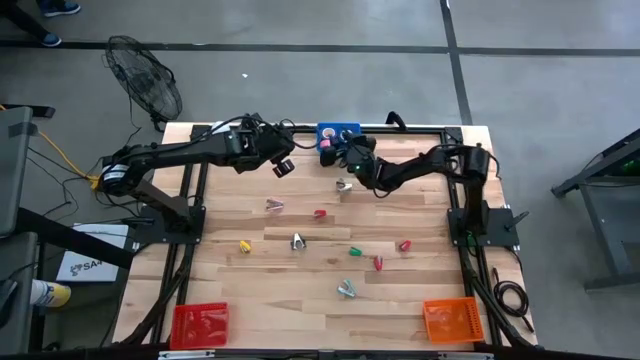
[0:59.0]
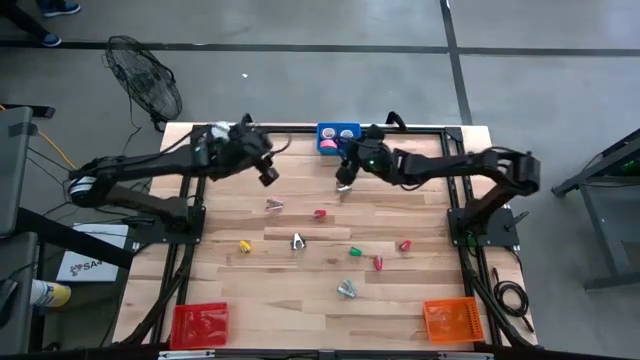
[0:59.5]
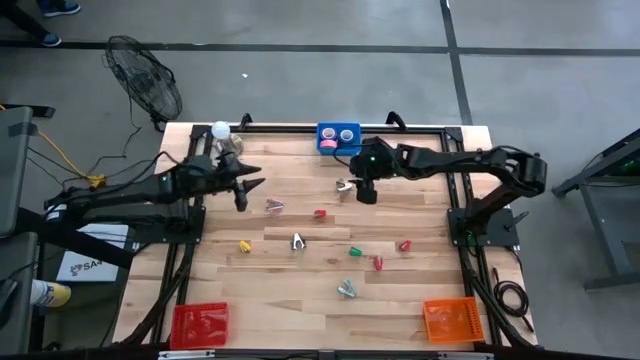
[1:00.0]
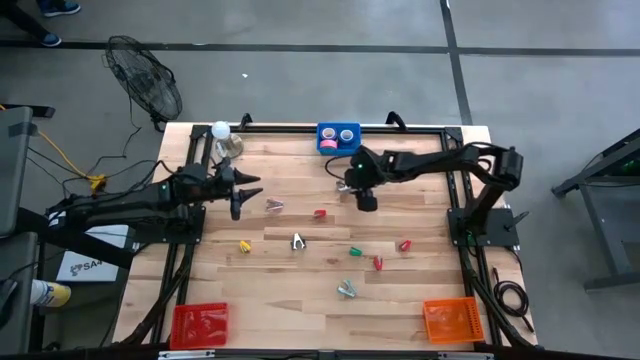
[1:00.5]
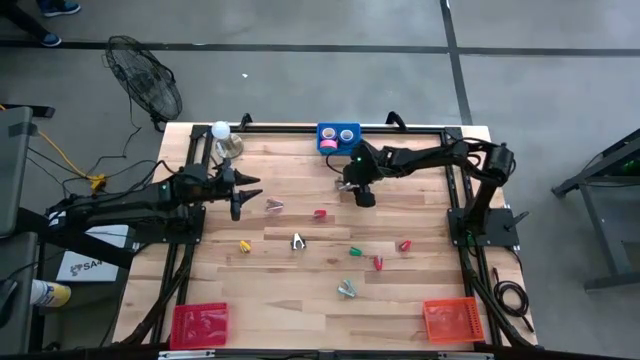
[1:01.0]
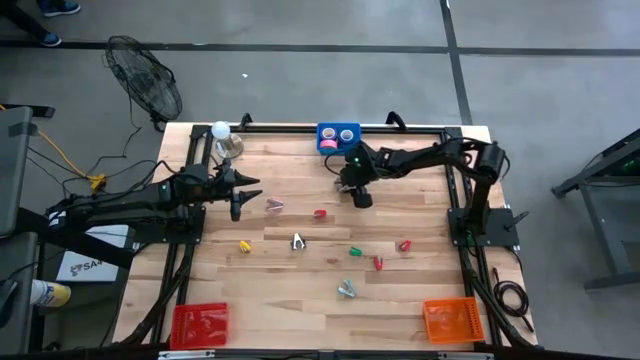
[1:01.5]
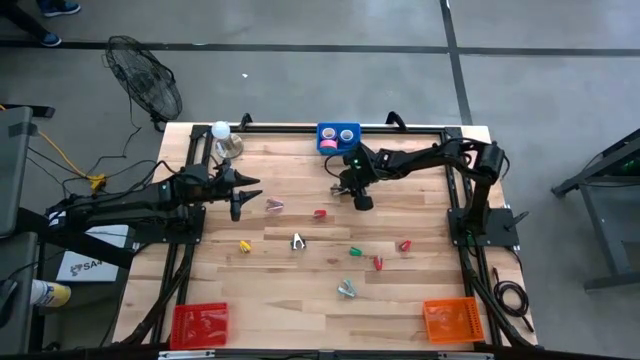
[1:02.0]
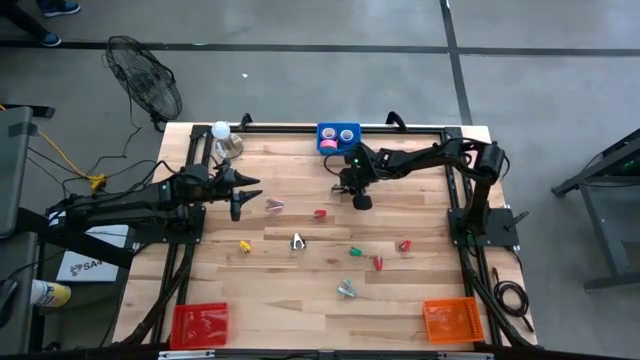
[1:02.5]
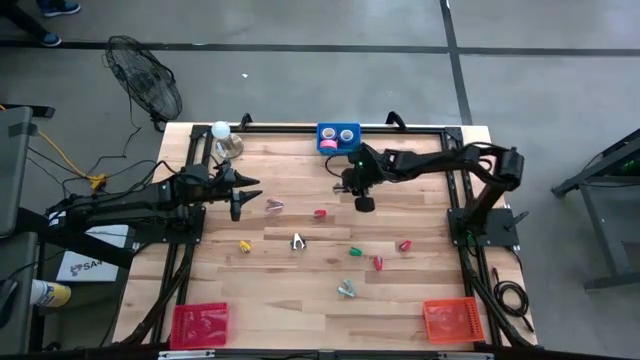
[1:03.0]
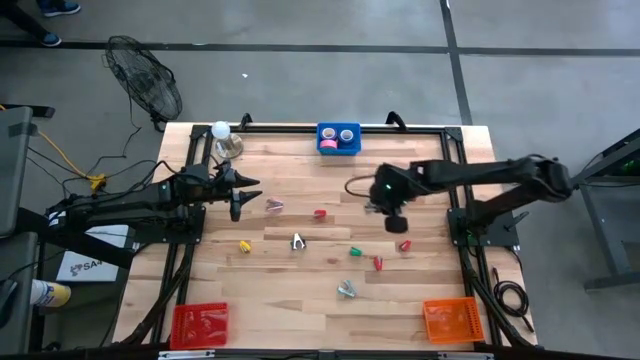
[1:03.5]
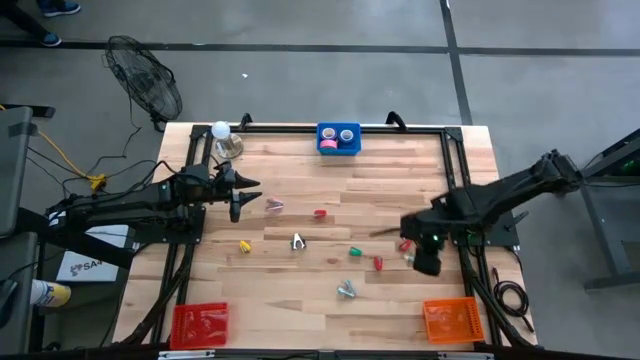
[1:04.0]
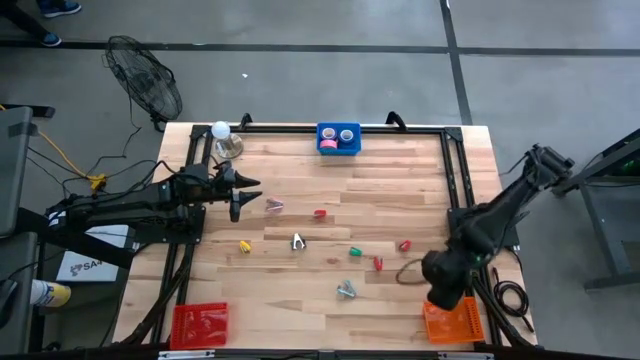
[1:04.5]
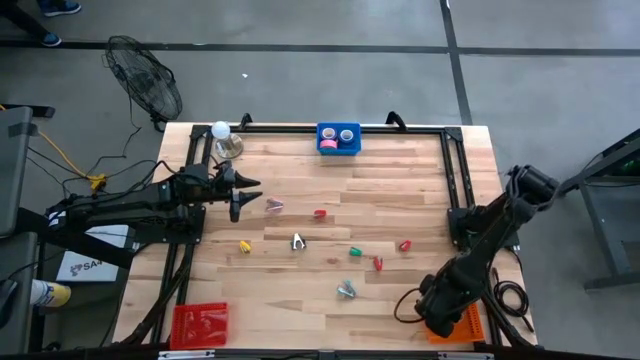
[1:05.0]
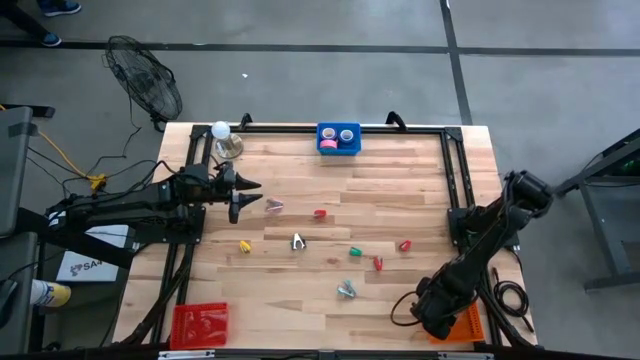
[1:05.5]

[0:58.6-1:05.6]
Task: Pick and place Stapler, Stapler remover, tape
Put the gray staple remover into the orange bin

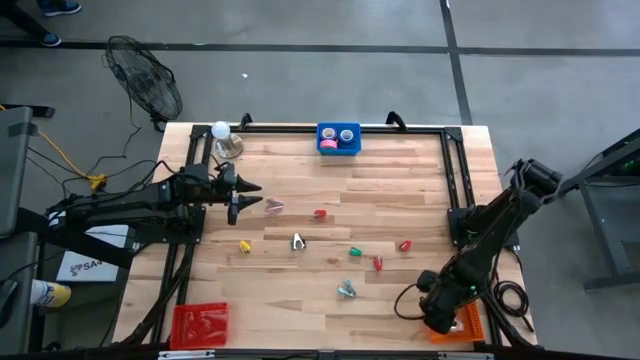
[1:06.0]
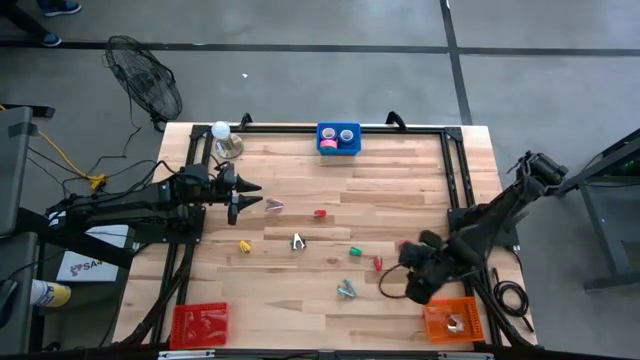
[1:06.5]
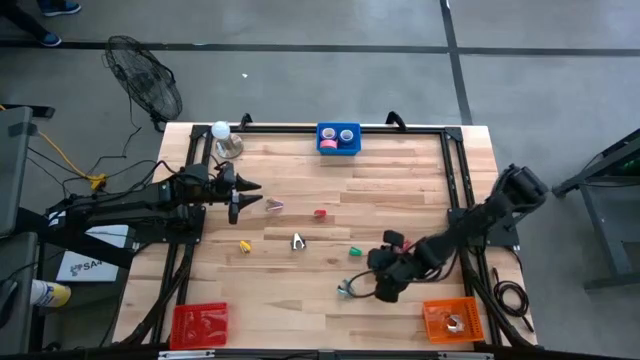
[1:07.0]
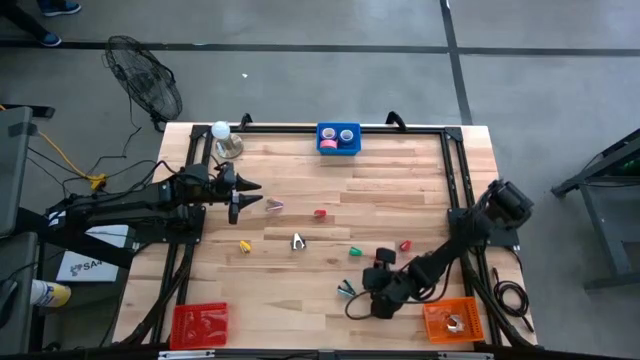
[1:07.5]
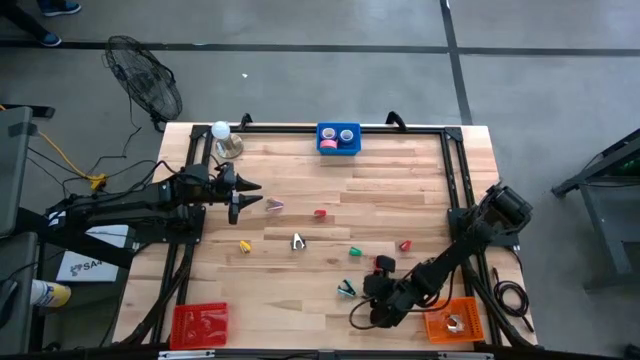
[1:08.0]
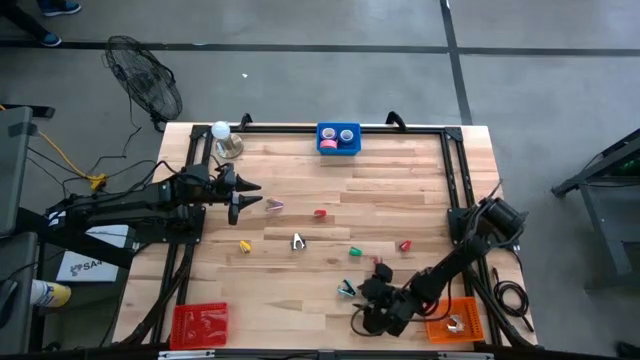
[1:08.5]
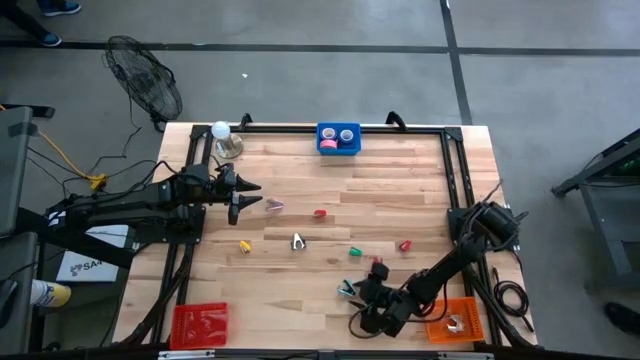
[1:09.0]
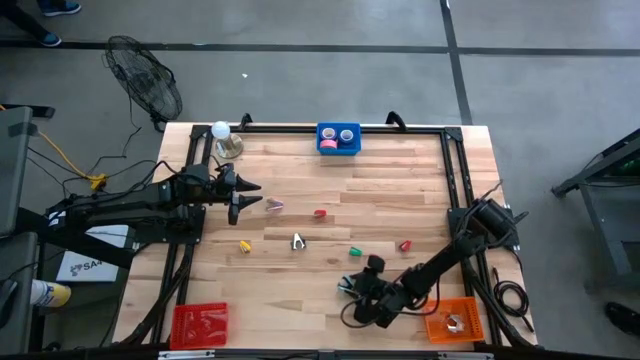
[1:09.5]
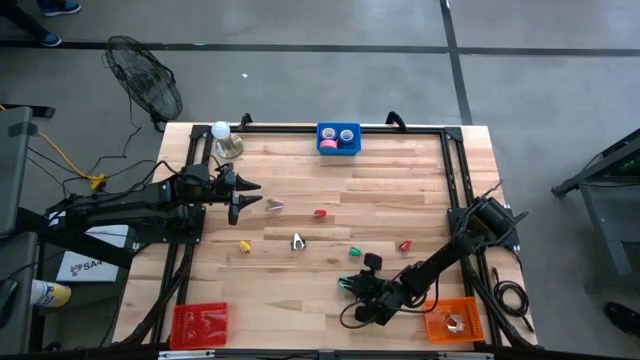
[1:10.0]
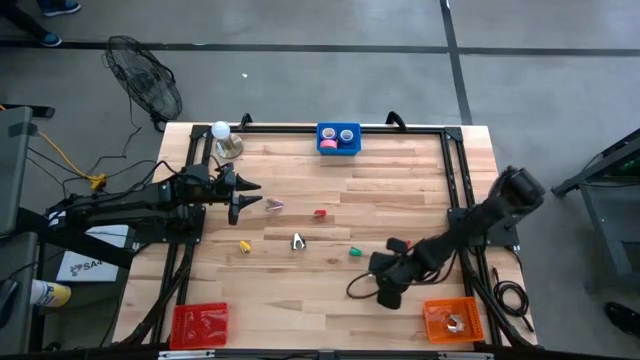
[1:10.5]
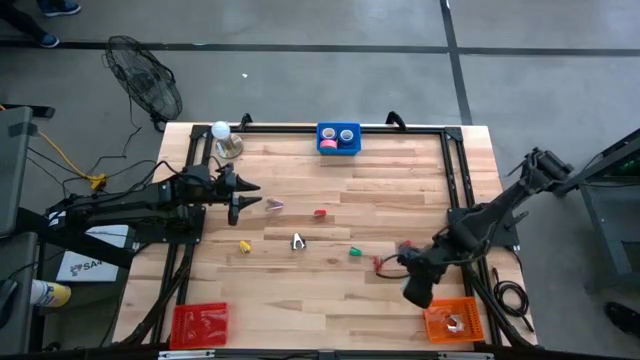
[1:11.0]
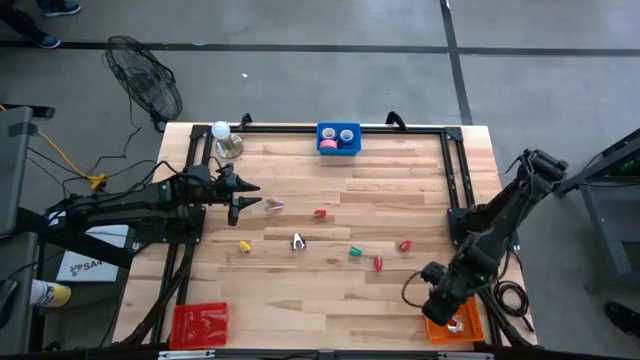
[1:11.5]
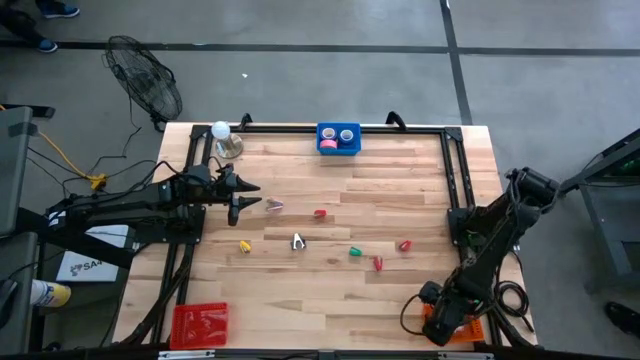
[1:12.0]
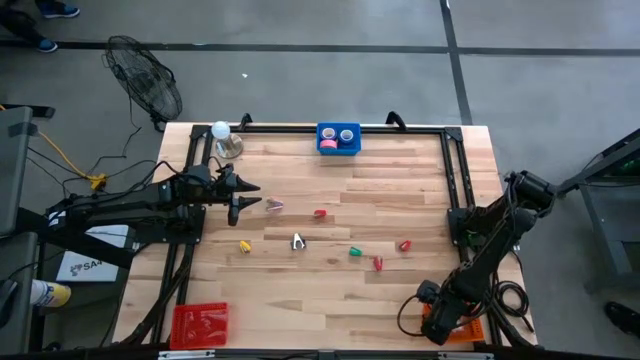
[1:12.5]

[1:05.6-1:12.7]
Put the light blue staple remover into the orange bin

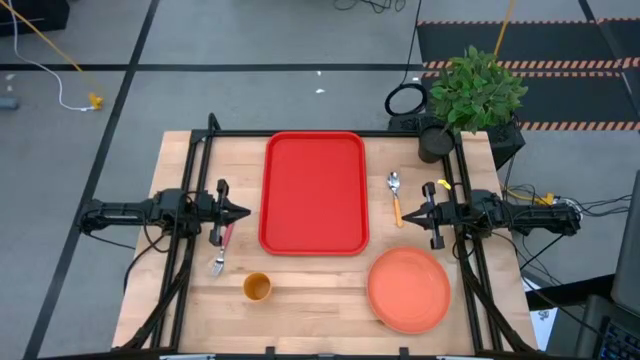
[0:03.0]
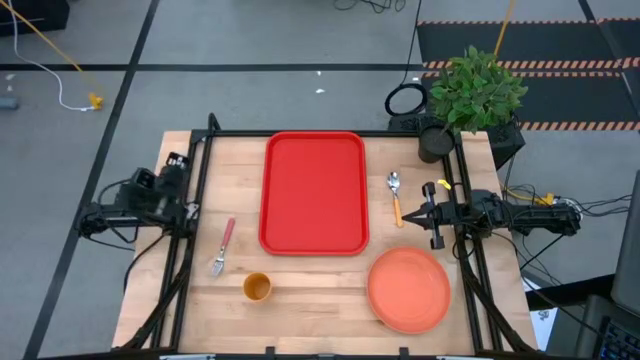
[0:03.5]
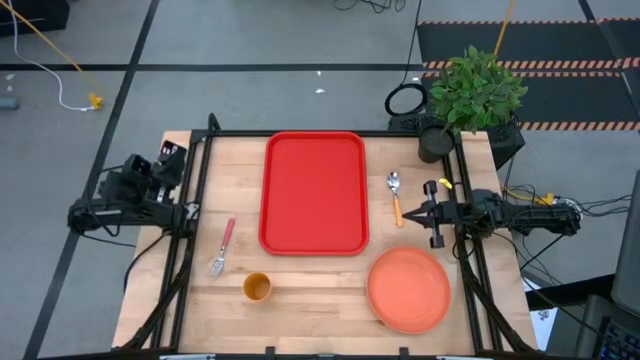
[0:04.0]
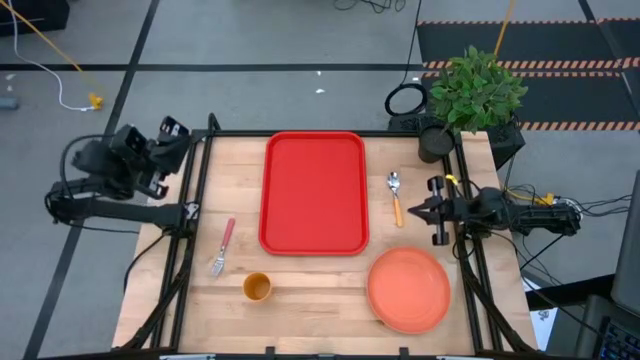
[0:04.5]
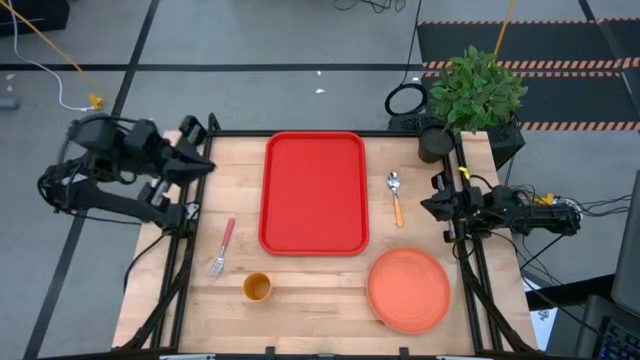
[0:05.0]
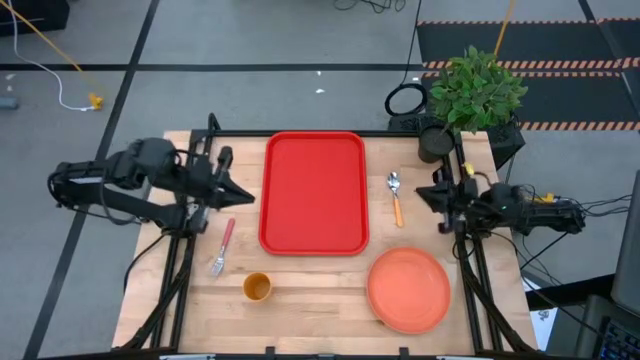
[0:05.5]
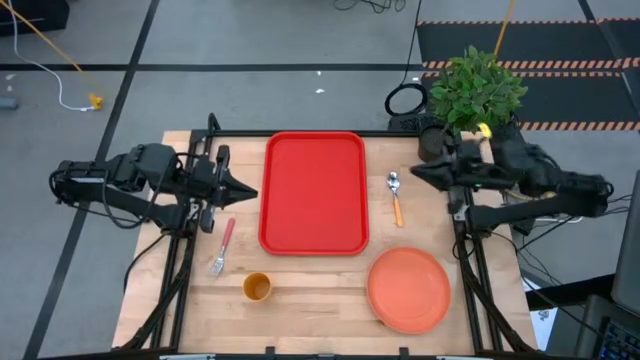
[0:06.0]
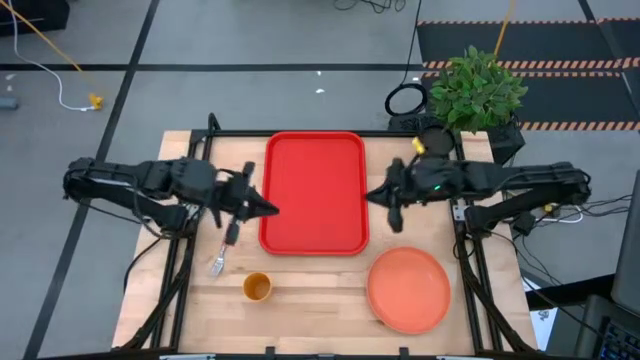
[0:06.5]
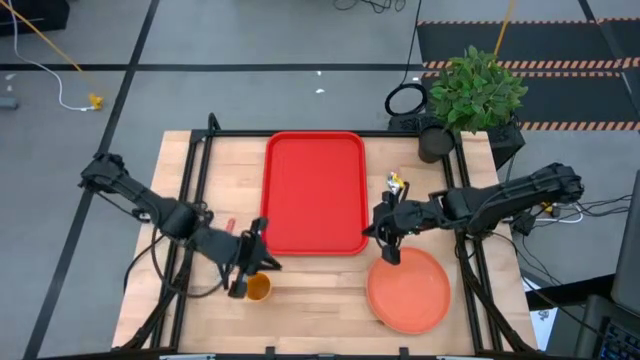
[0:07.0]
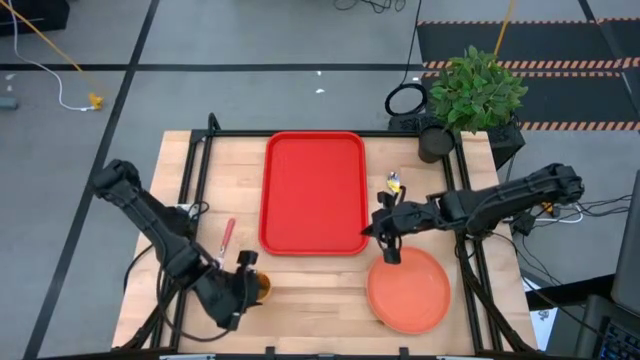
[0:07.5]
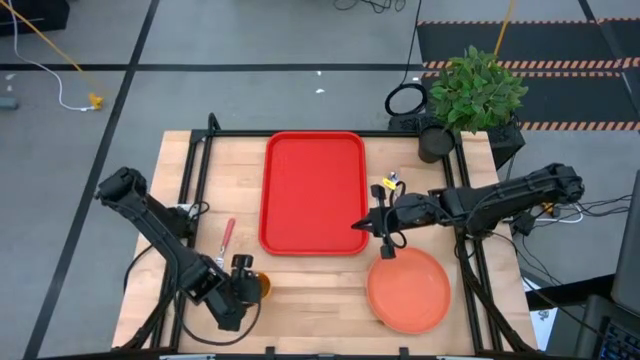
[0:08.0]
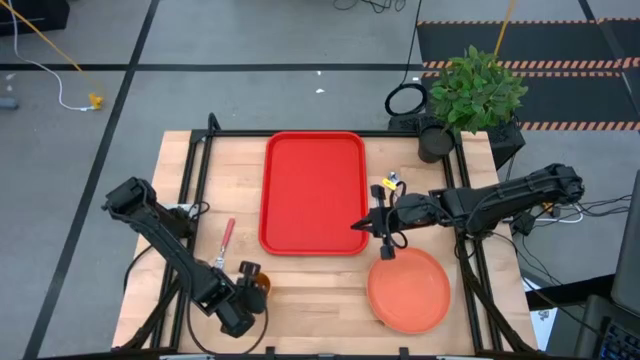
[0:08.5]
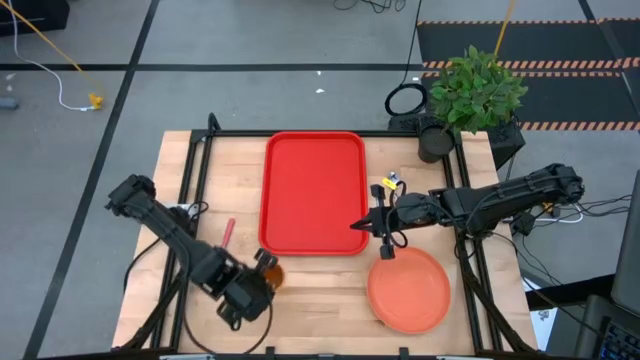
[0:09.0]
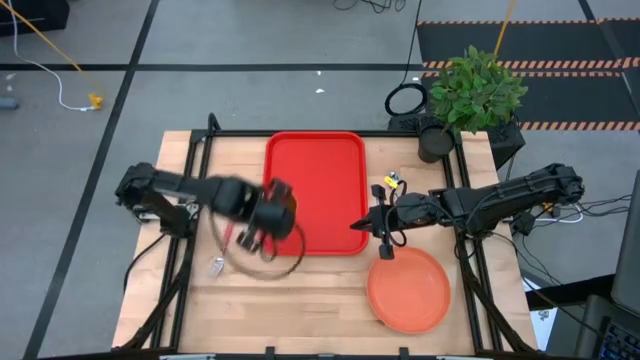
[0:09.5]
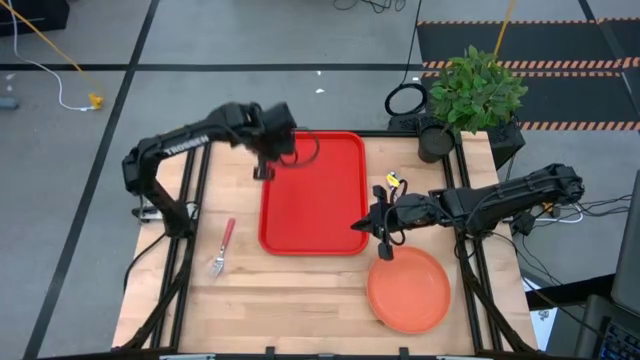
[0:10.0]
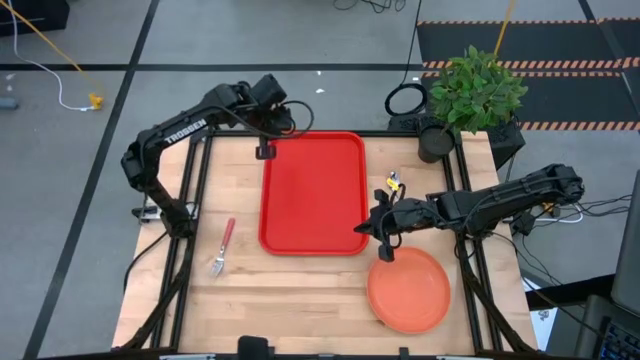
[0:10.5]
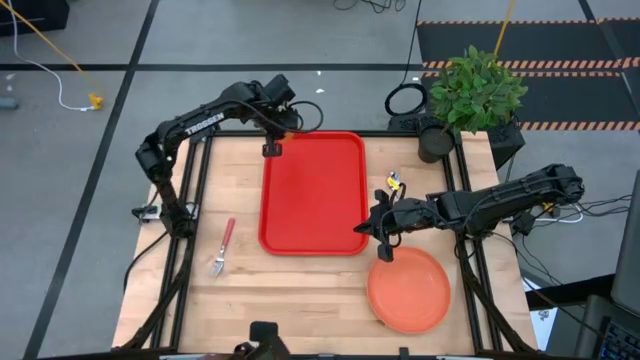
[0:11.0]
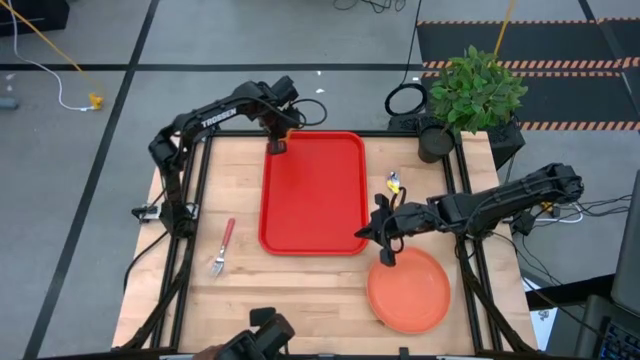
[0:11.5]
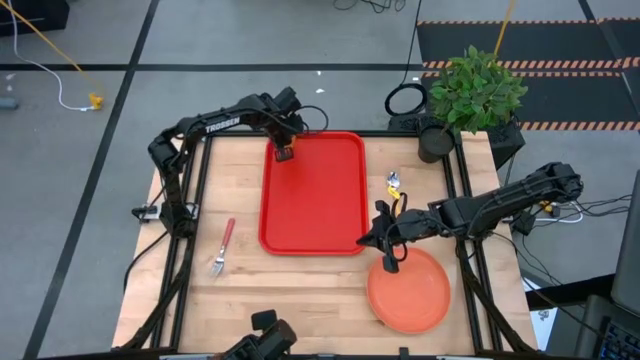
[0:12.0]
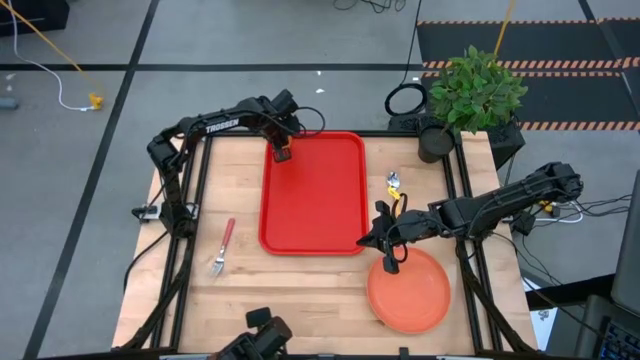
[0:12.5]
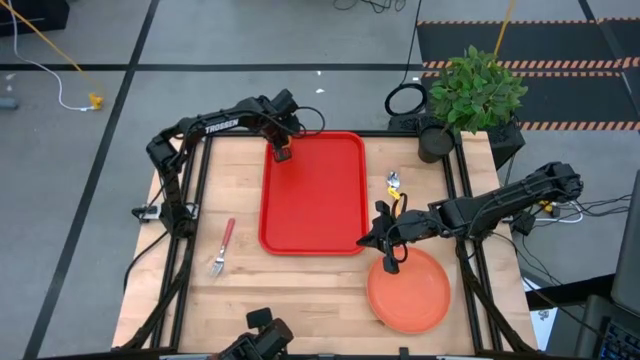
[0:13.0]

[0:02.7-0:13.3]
Task: Pick and place plate/cup/fork/spoon on tray
Put the yellow cup on the red serving tray
